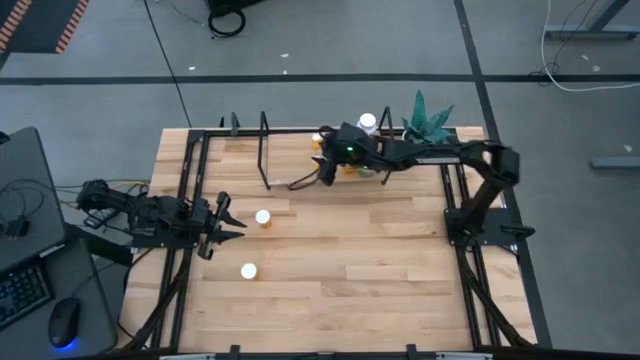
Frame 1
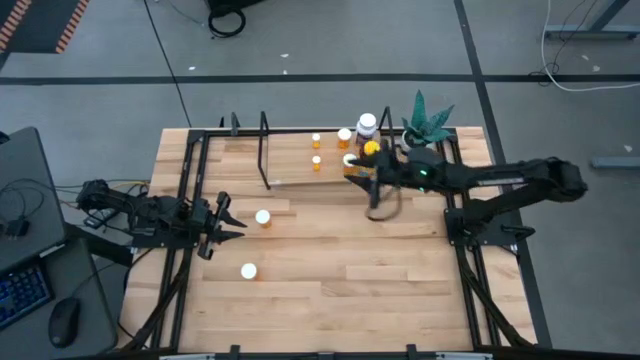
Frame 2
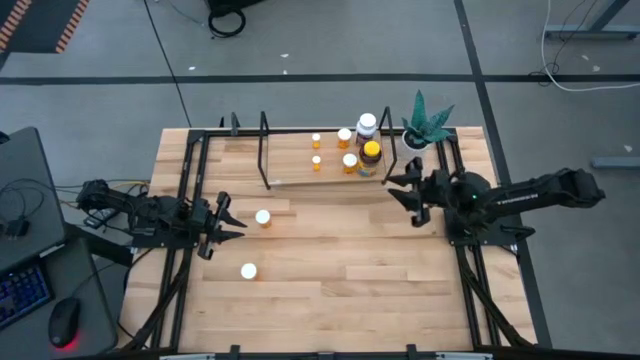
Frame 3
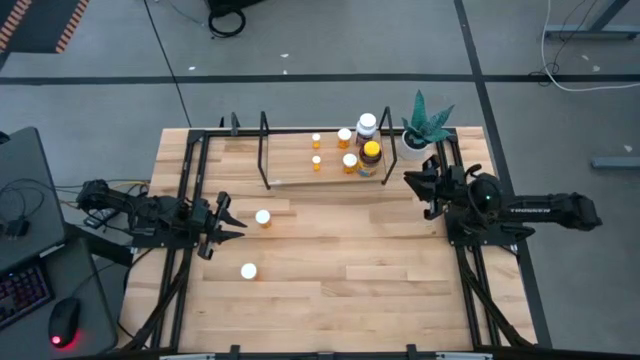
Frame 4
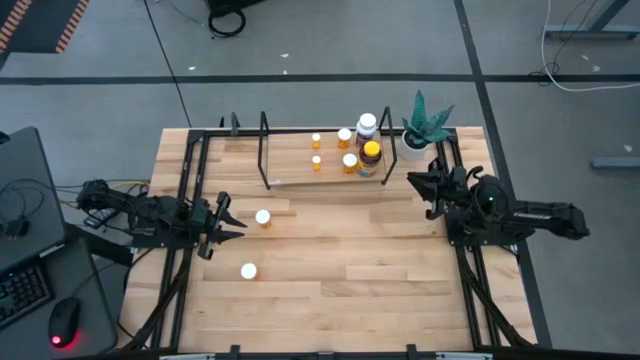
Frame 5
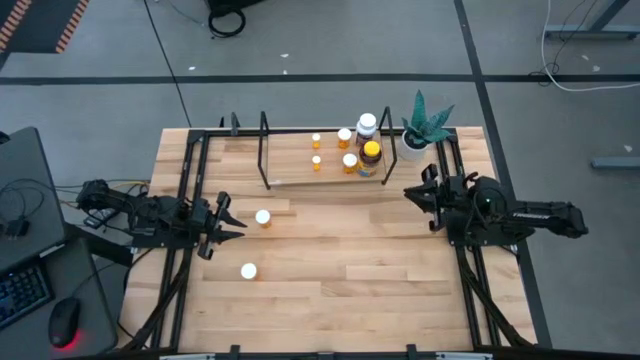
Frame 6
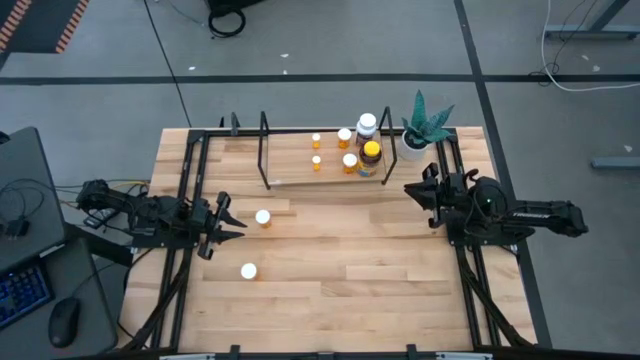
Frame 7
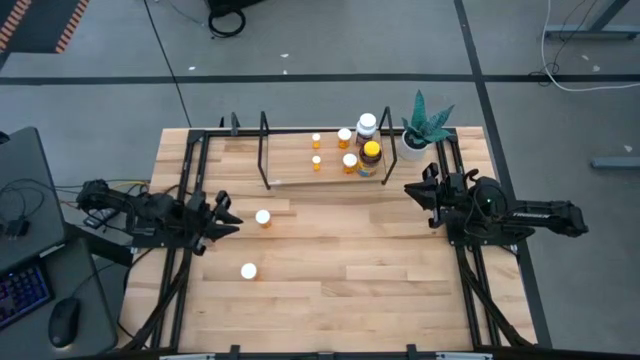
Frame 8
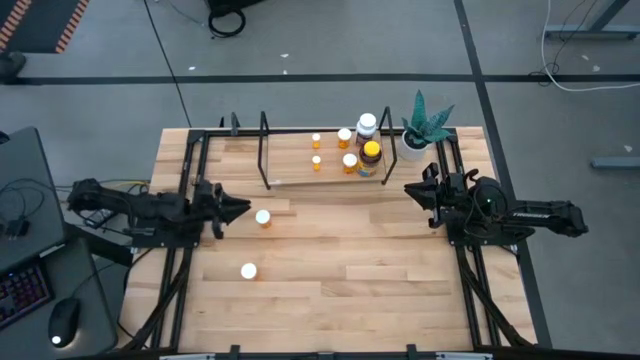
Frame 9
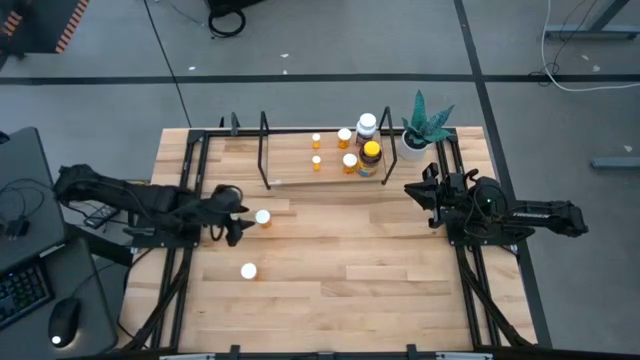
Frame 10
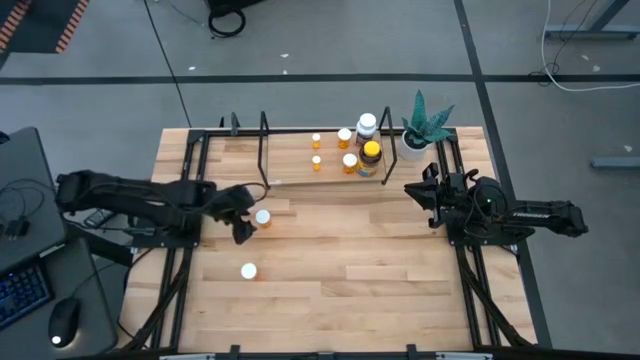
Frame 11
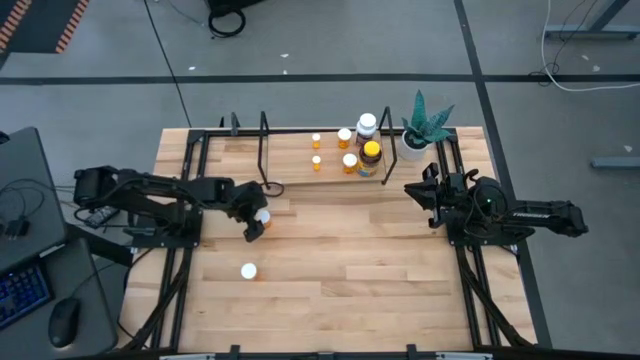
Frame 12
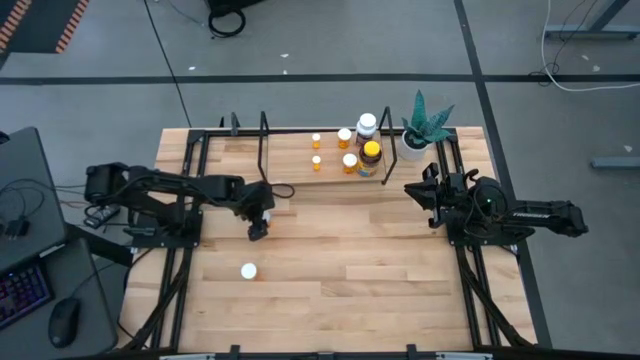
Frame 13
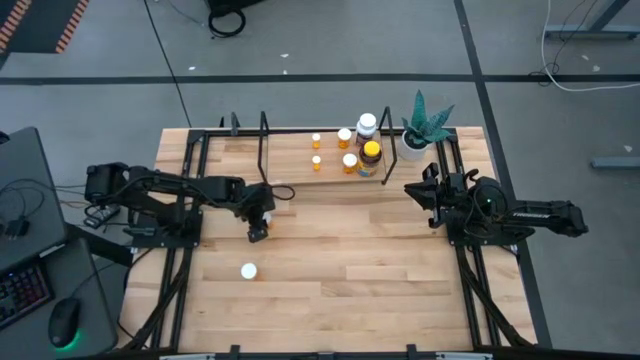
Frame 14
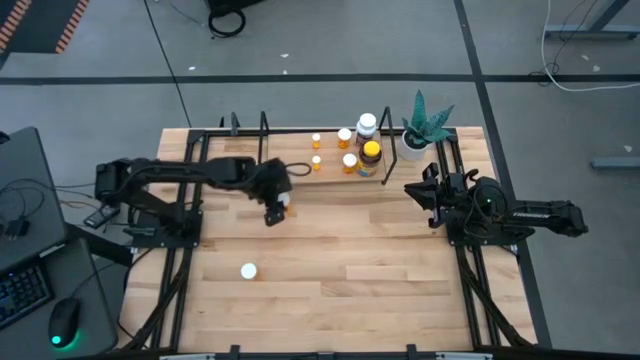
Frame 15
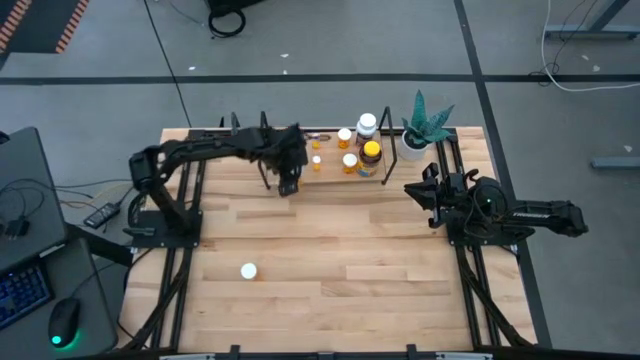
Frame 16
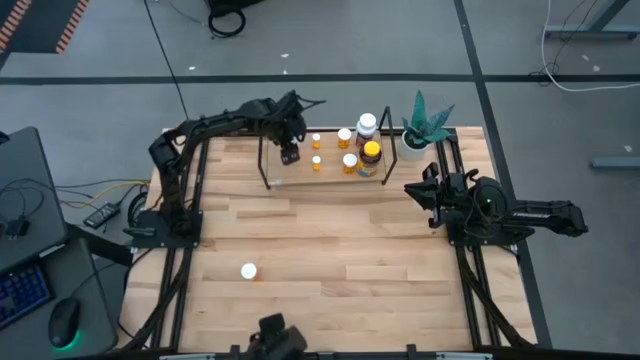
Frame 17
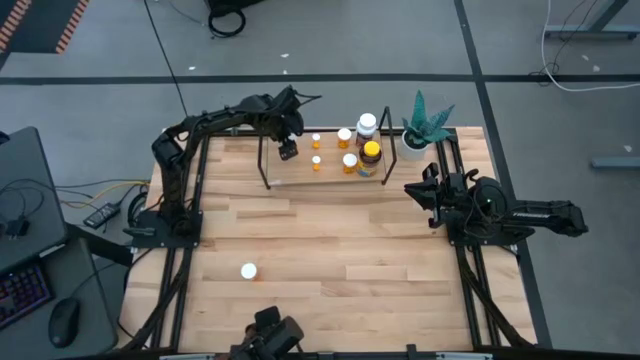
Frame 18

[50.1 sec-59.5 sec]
Task: Pick and place medicine bottles onto shelf by color
Put the large orange bottle on the shelf

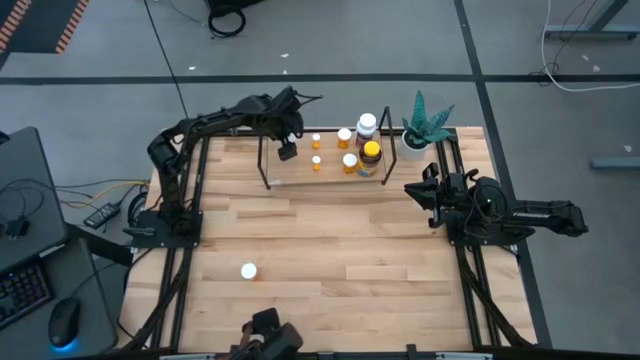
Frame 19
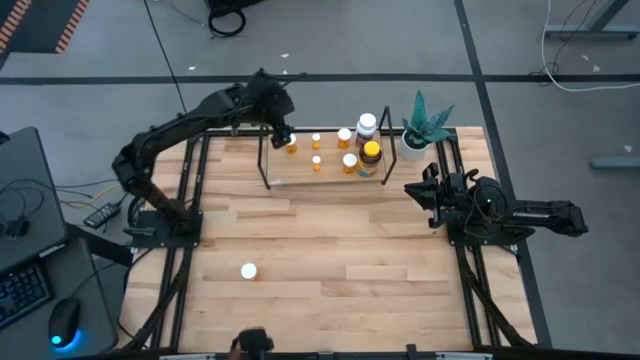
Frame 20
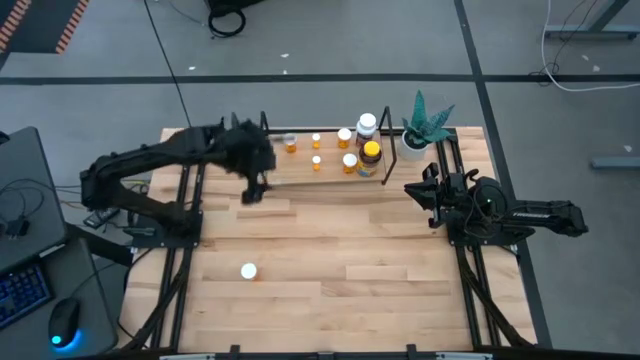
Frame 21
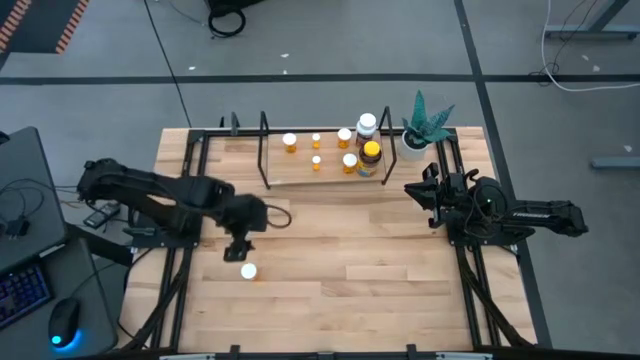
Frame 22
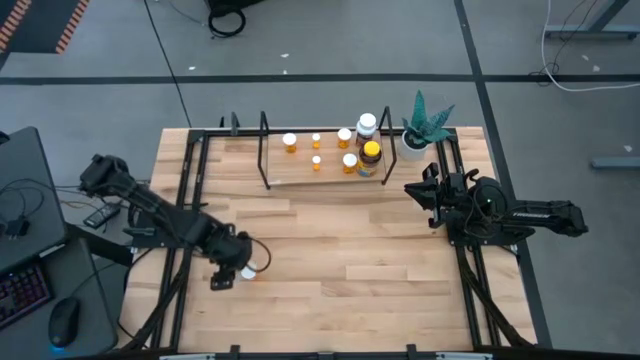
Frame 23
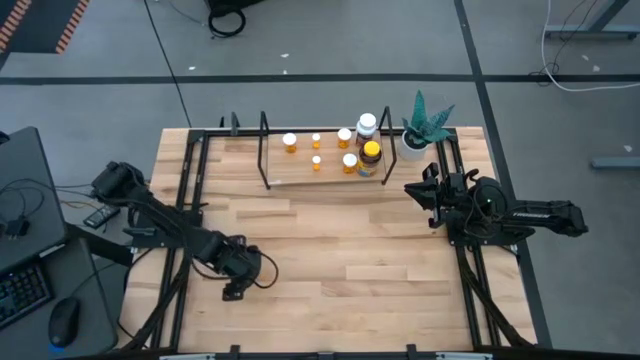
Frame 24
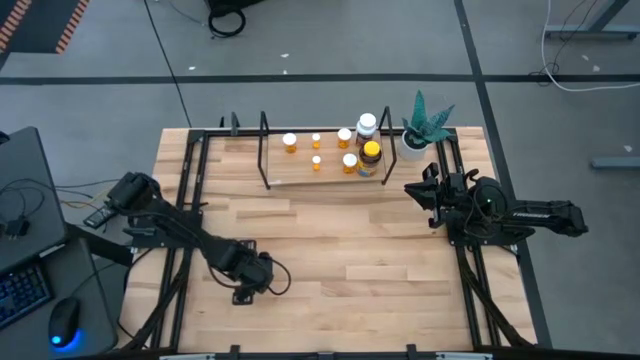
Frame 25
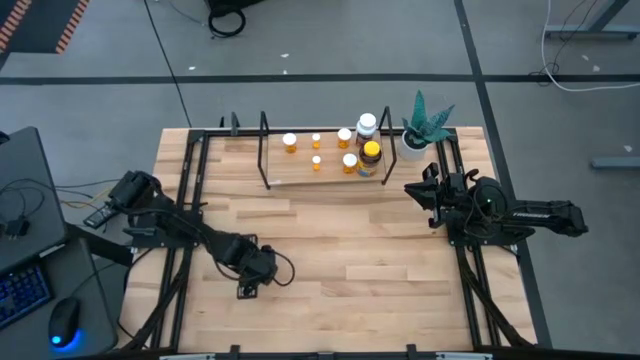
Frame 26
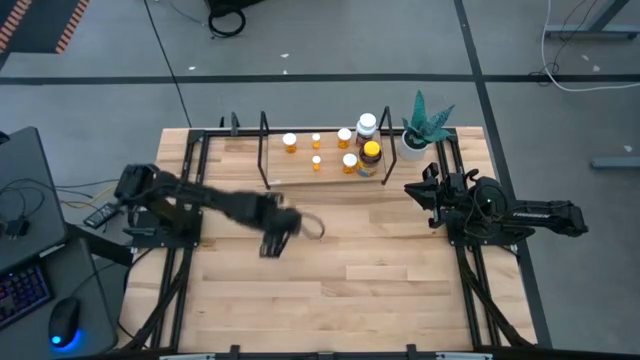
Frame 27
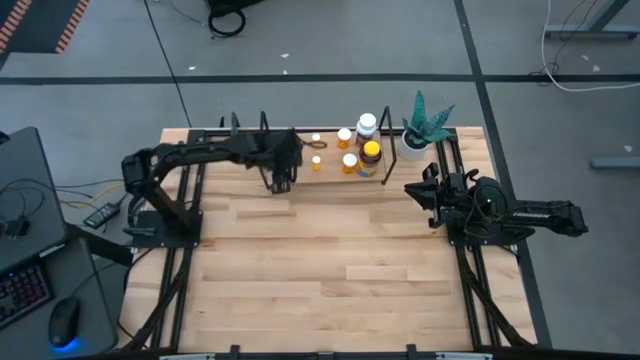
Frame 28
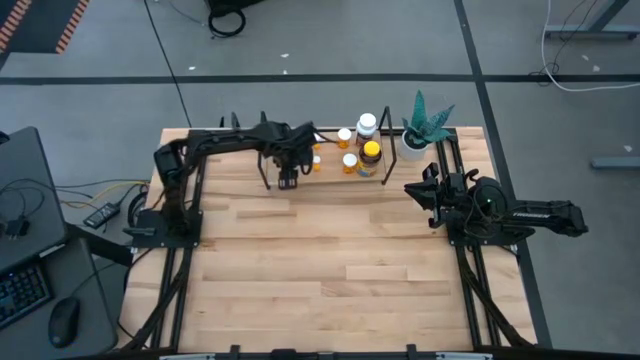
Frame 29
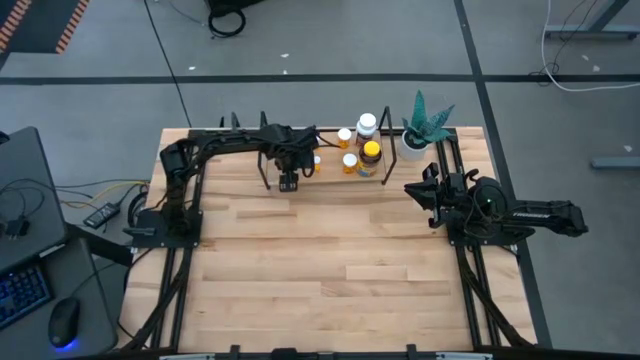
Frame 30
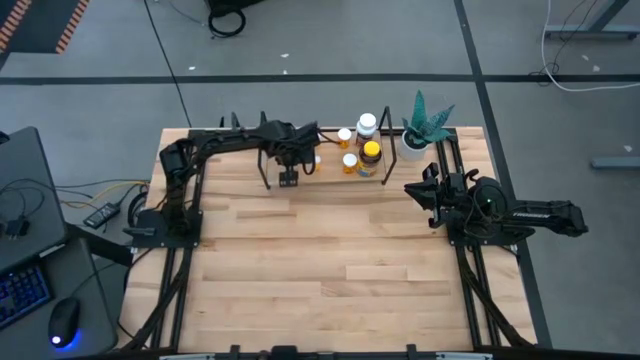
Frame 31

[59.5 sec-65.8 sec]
Align the large orange bottle with the large orange bottle on the shelf

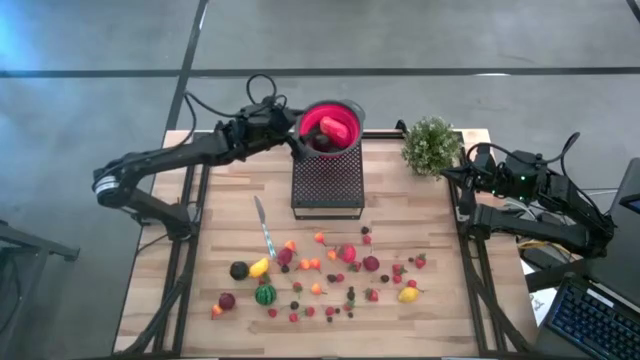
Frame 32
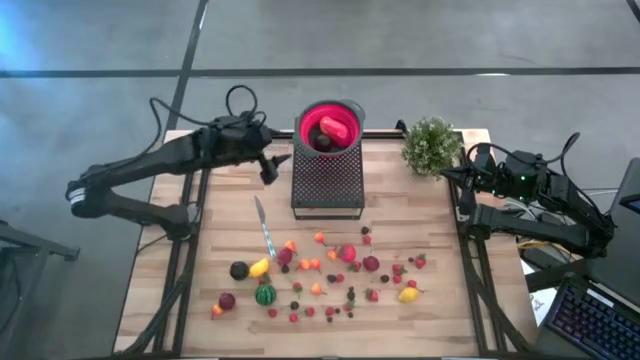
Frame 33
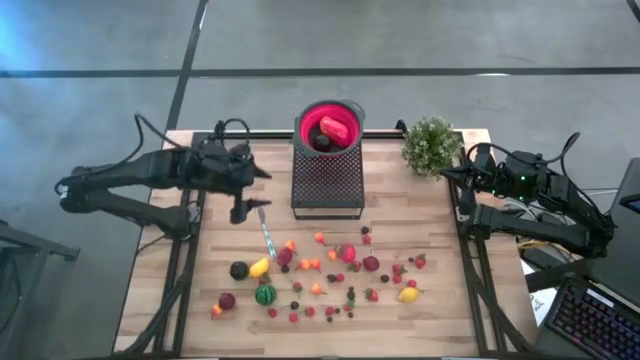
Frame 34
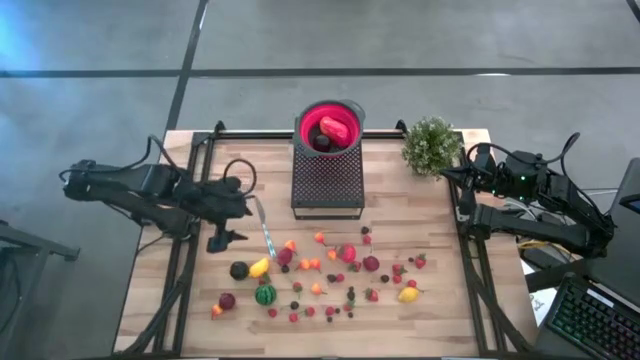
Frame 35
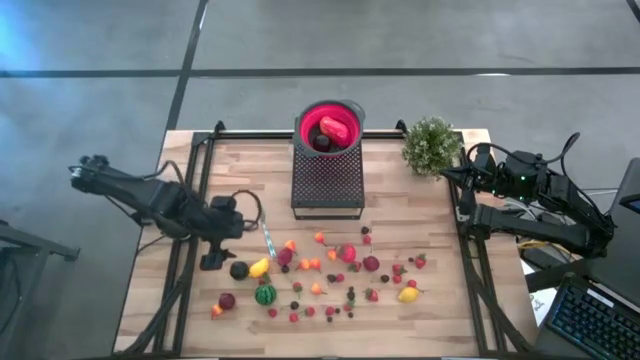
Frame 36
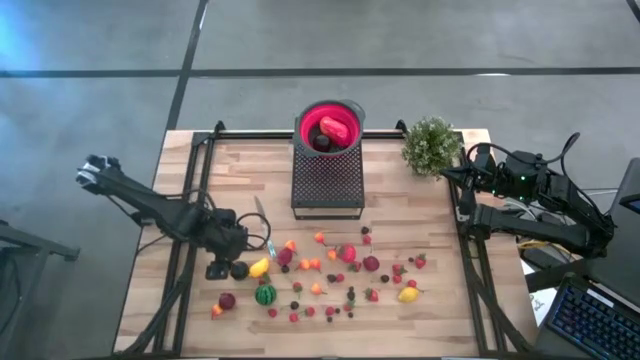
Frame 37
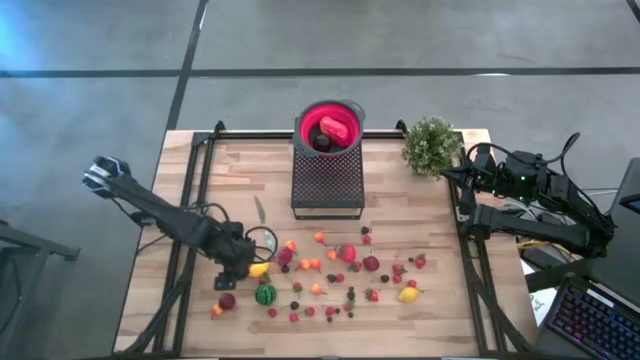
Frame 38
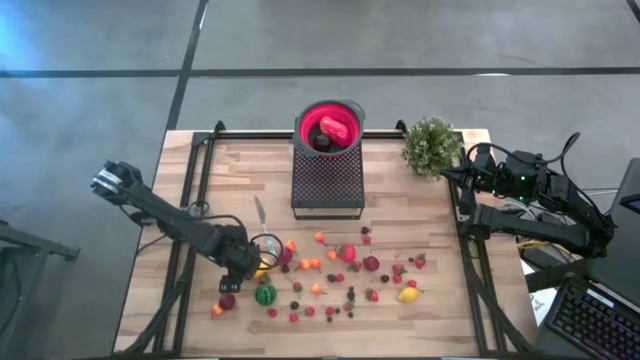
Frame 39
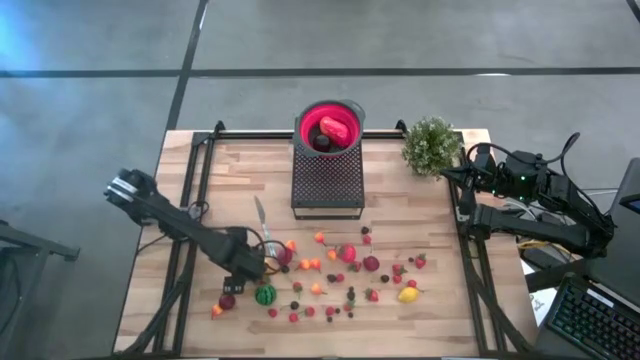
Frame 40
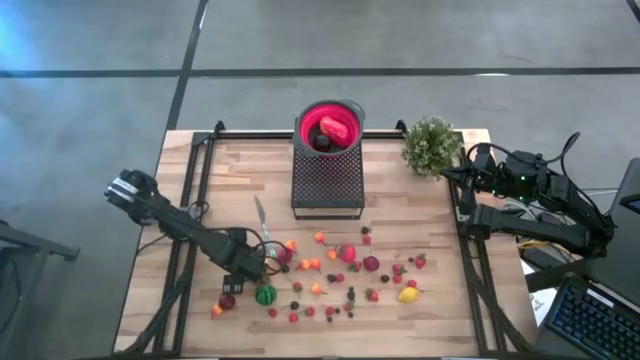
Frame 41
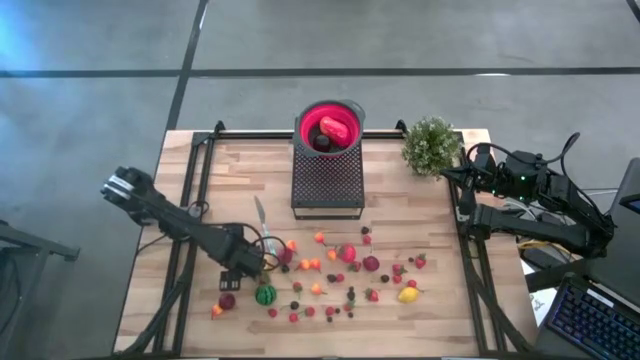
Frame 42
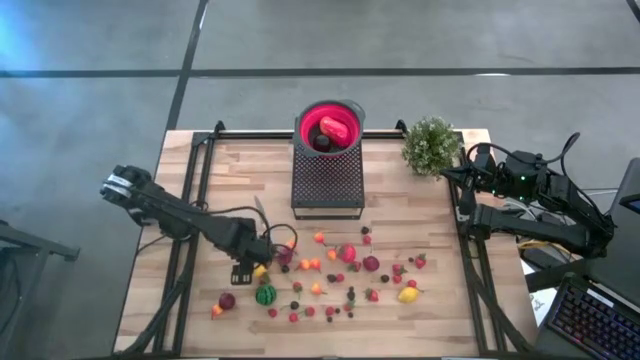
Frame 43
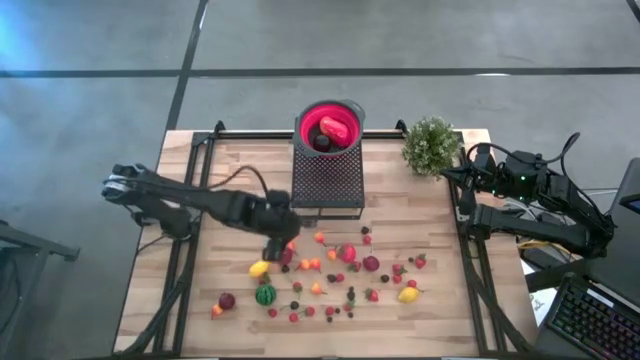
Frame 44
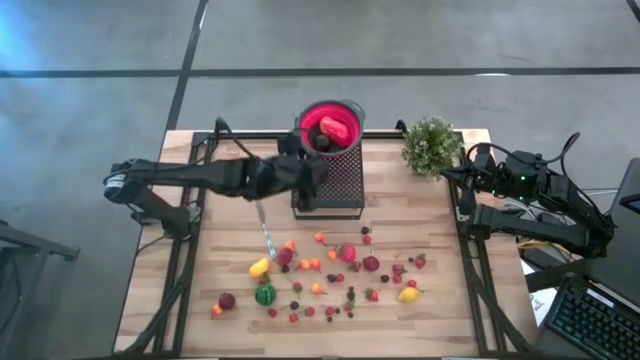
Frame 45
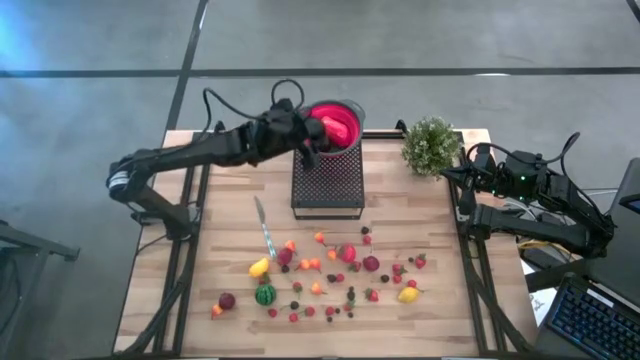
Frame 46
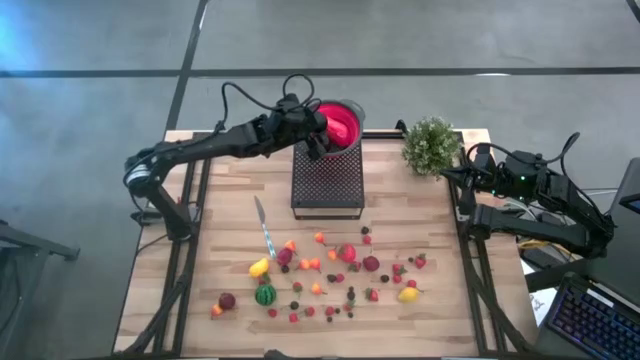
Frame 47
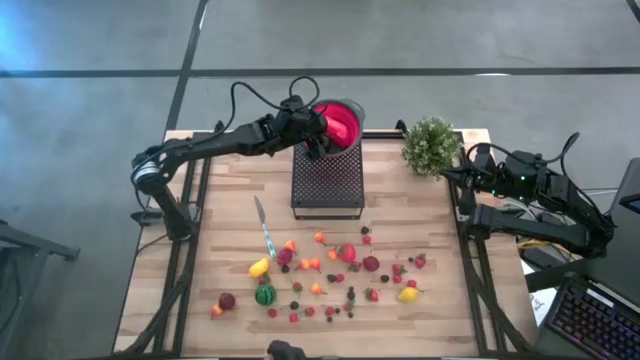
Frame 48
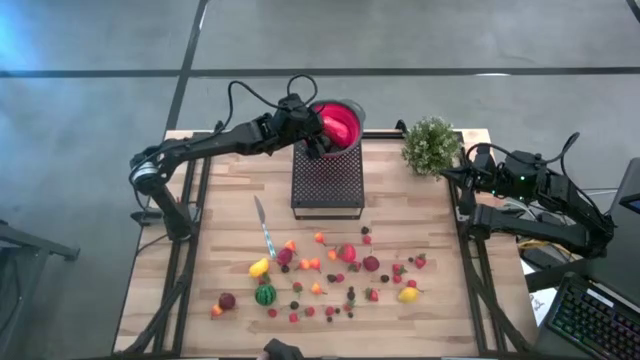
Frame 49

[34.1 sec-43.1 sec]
Task: Pick & Place Fruit
Put the plum into the strainer bowl on the shelf
